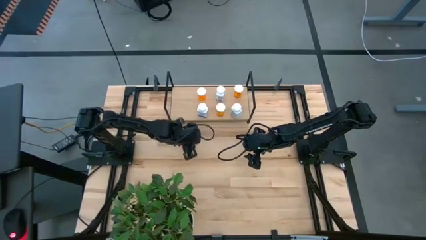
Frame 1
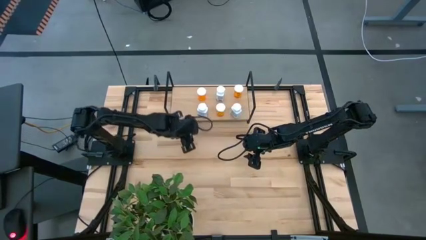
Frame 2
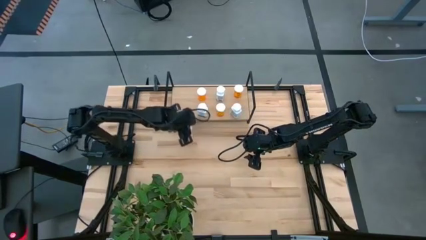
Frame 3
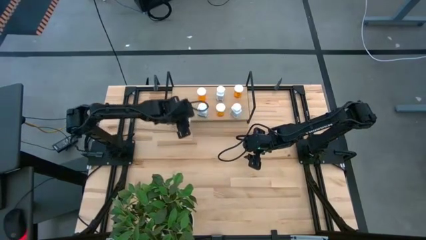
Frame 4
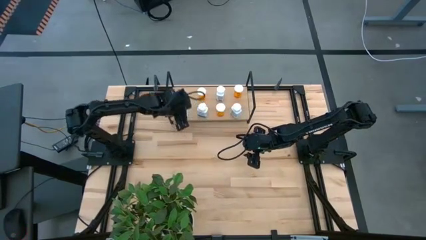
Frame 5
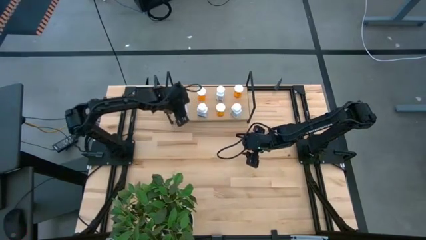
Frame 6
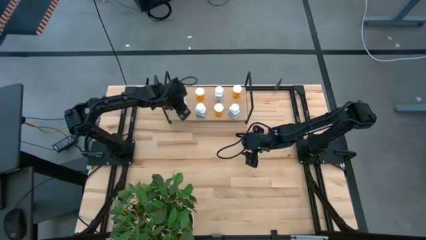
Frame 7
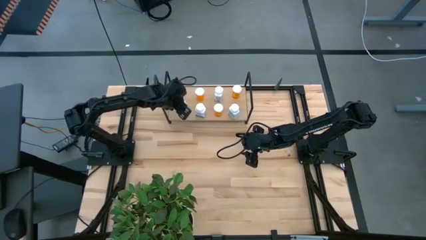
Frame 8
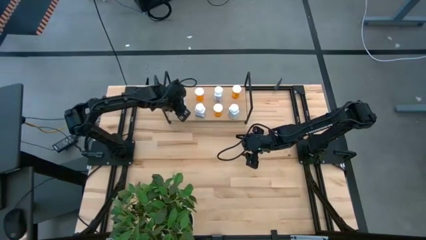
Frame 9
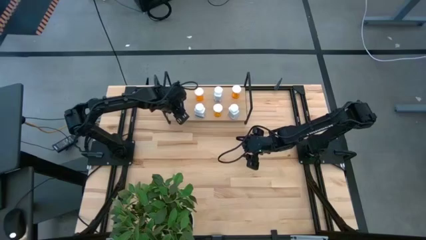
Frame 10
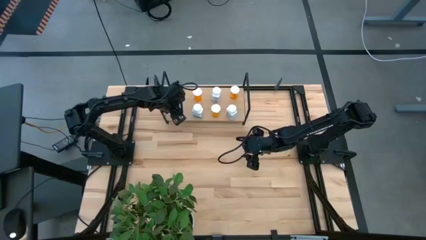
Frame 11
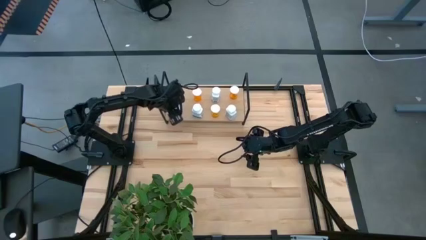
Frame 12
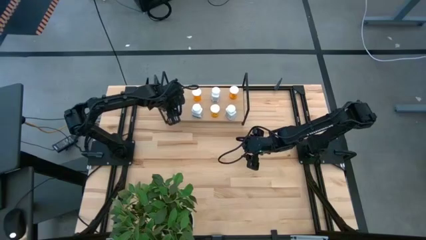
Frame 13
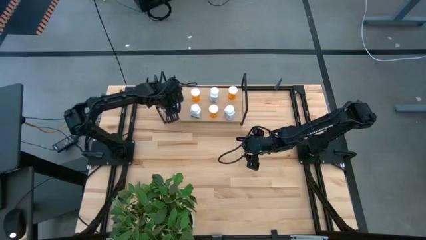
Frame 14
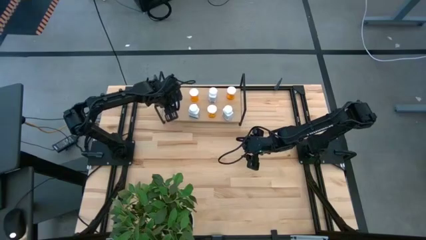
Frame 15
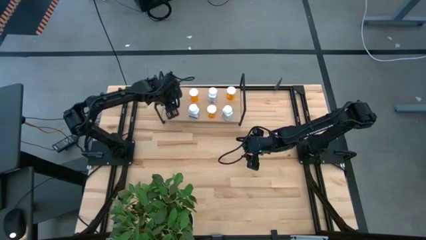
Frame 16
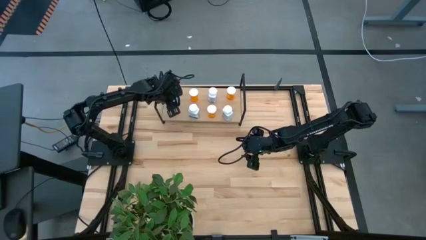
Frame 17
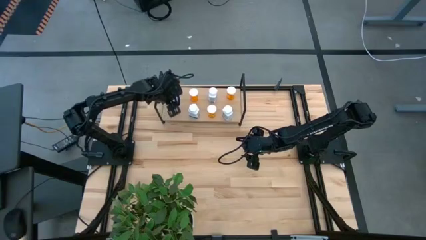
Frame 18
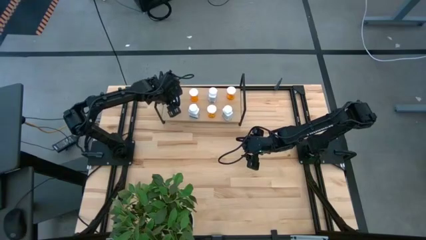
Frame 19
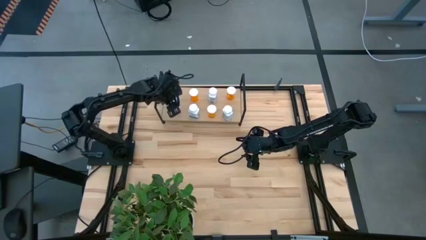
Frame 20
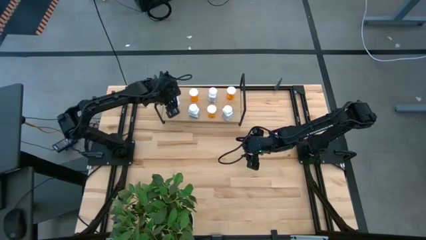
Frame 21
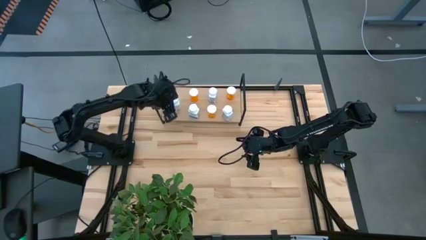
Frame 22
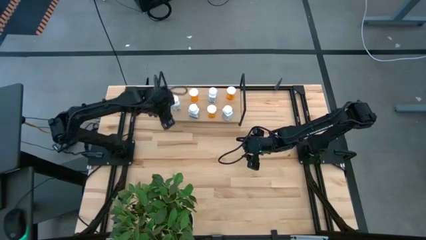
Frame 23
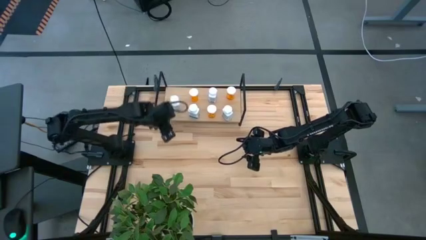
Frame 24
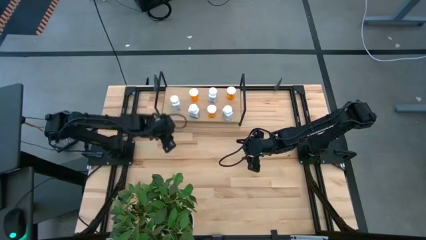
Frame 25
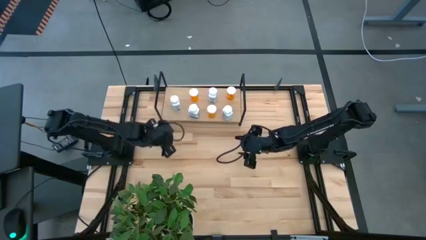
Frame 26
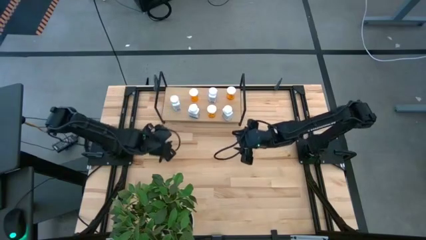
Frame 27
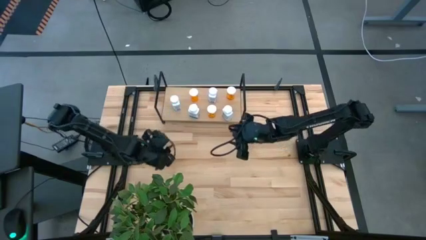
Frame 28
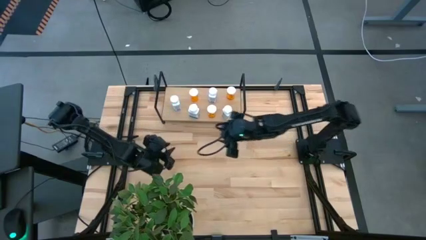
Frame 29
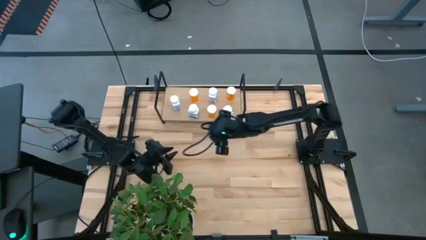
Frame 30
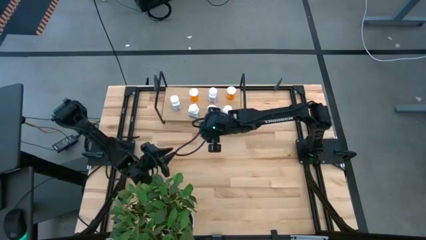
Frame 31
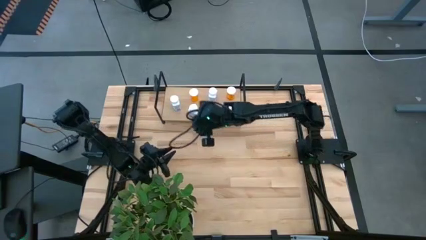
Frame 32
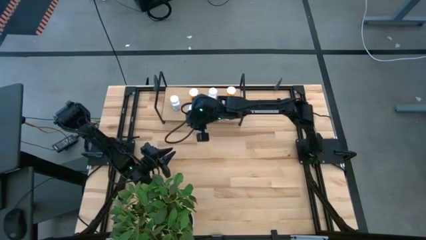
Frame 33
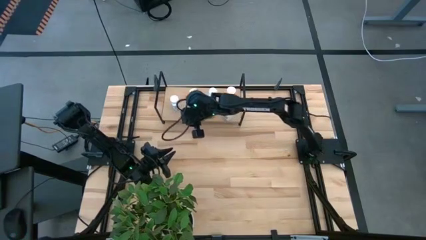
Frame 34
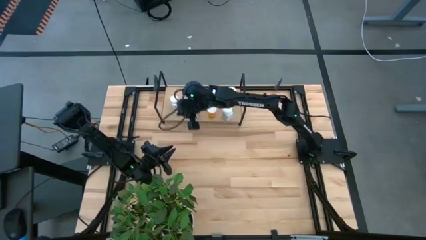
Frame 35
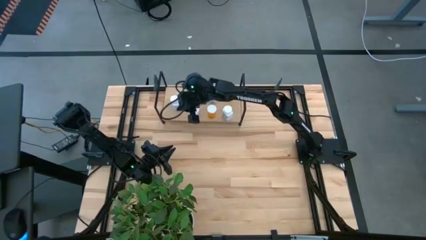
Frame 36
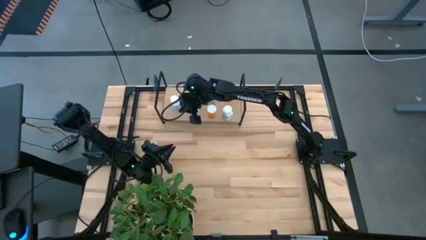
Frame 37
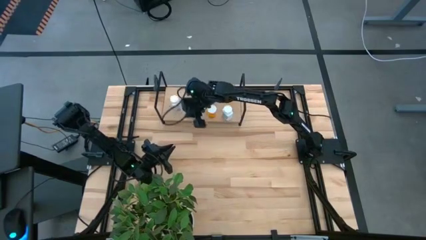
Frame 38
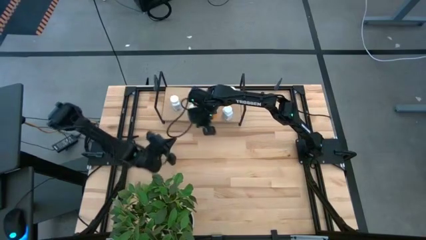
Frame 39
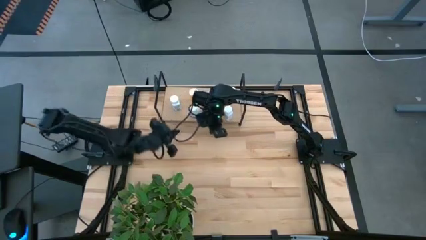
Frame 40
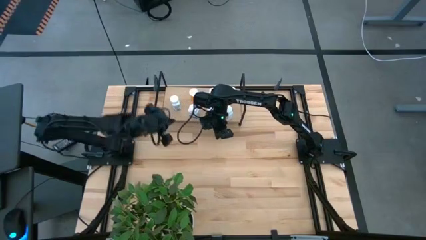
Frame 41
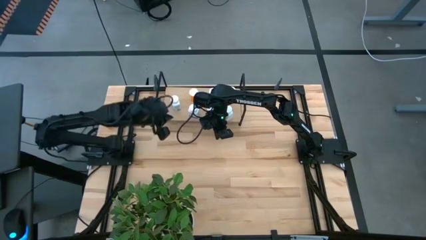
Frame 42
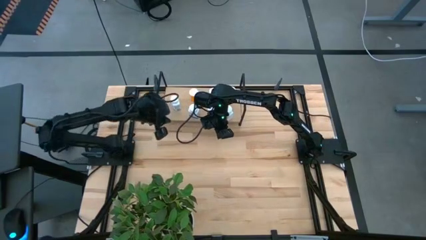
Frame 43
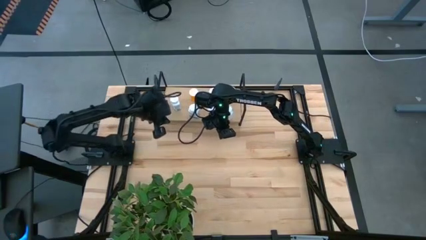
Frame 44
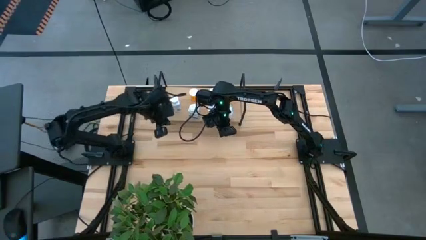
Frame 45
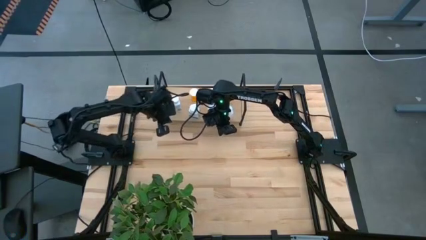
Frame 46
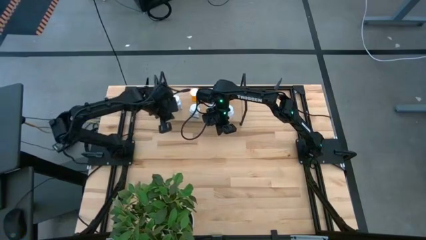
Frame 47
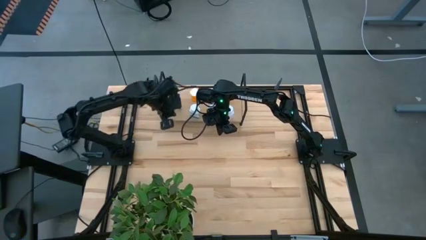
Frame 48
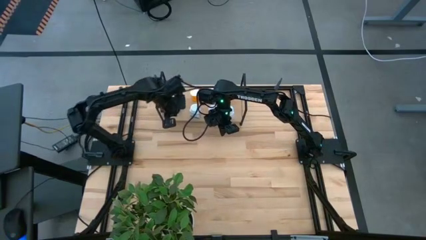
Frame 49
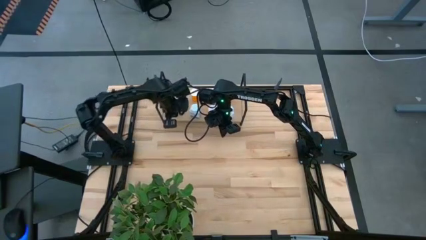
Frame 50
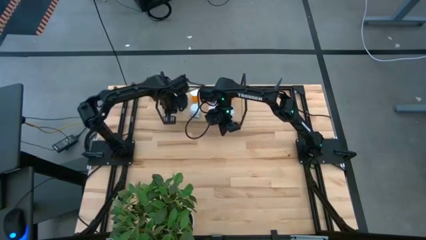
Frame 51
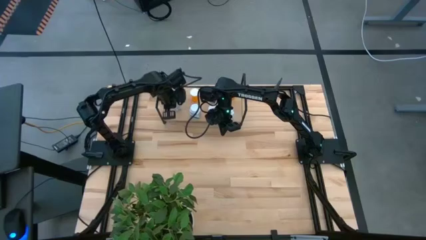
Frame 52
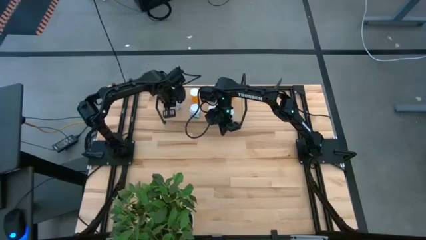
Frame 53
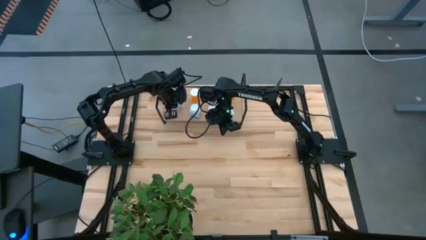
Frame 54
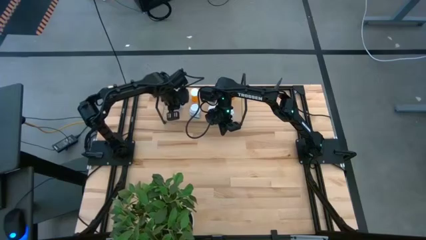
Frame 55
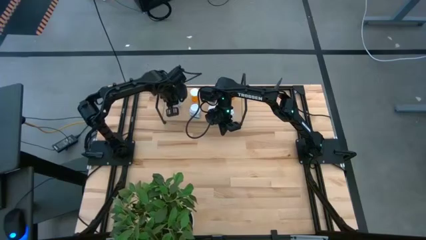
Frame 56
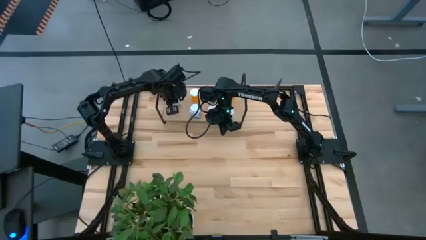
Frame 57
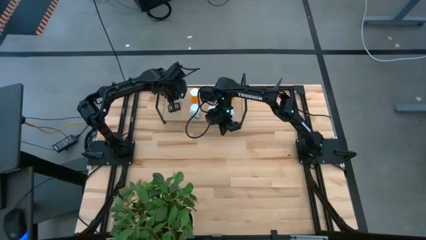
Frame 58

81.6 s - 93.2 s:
Task: Pick and place medicine bottles onto shelf by color
Put the white pill bottle on the shelf

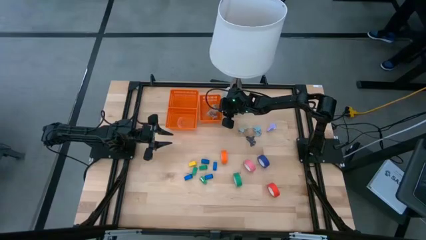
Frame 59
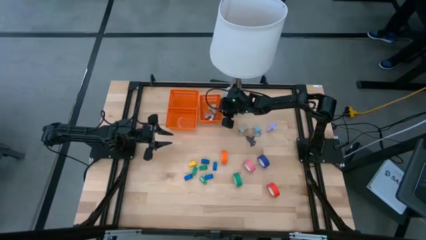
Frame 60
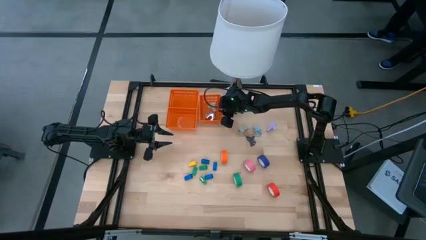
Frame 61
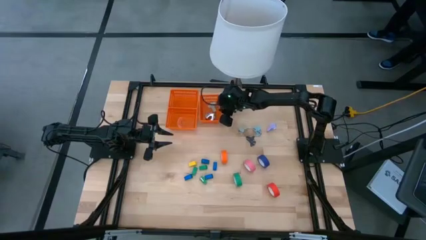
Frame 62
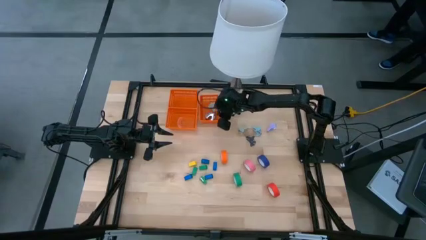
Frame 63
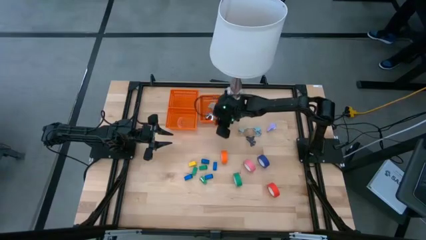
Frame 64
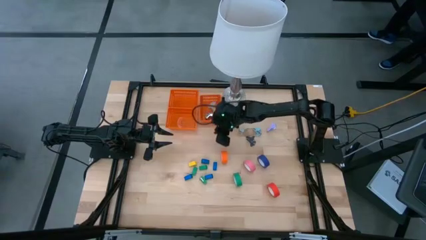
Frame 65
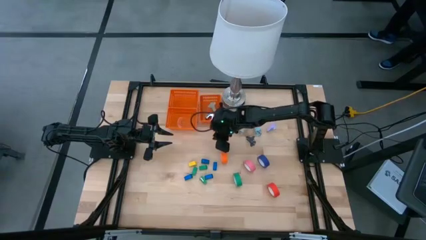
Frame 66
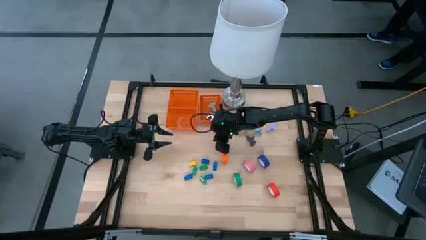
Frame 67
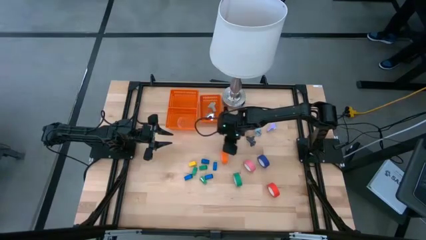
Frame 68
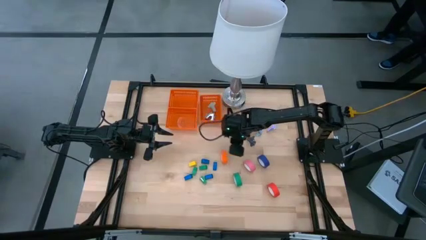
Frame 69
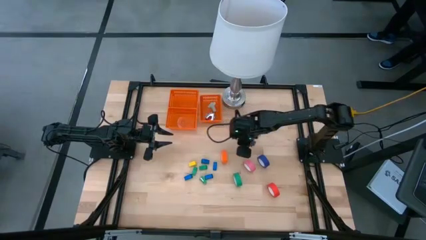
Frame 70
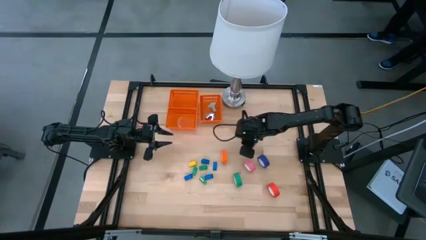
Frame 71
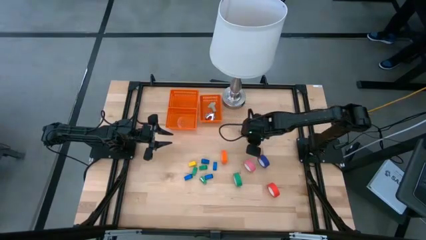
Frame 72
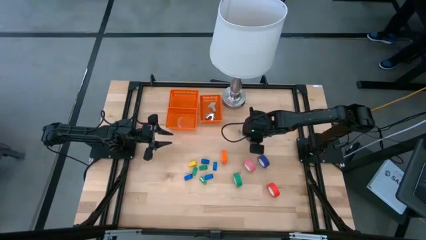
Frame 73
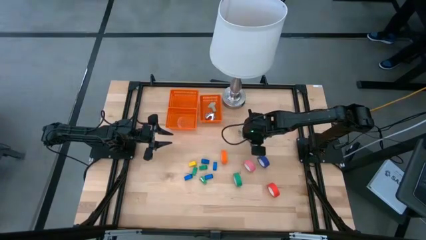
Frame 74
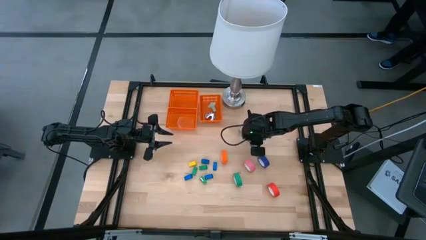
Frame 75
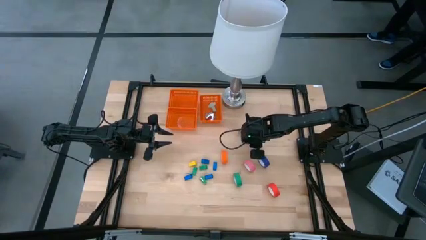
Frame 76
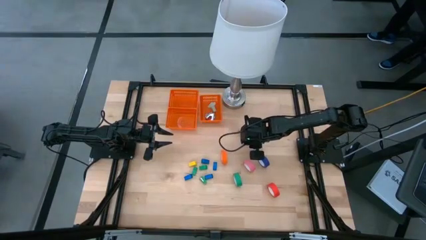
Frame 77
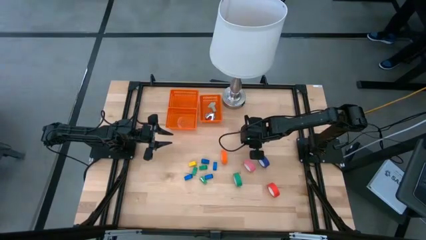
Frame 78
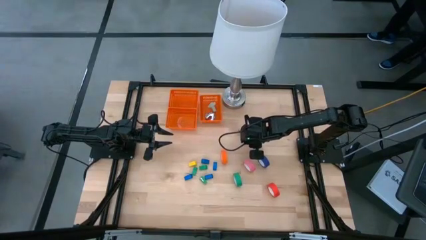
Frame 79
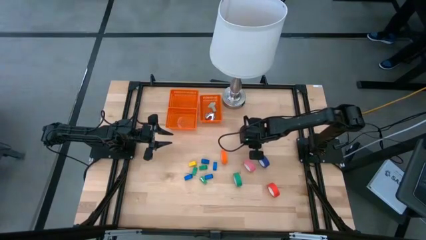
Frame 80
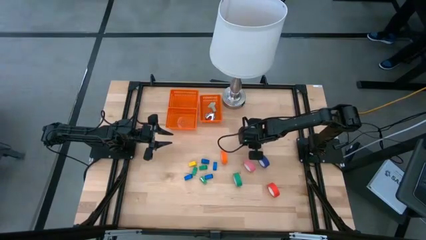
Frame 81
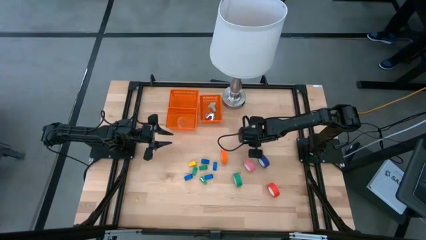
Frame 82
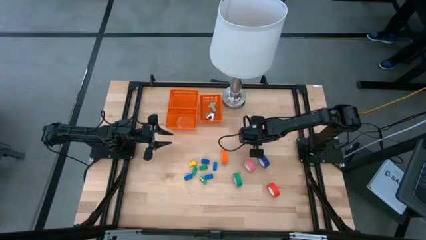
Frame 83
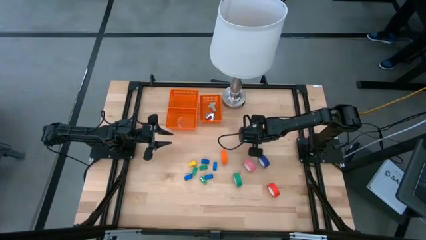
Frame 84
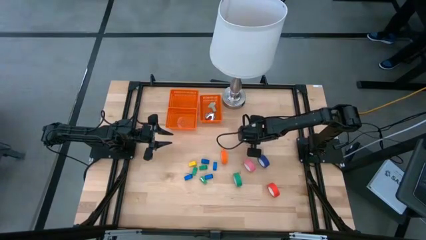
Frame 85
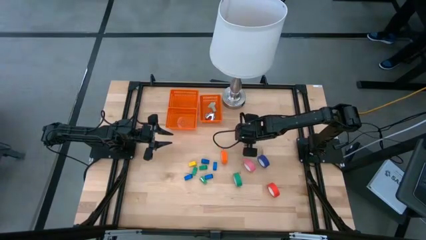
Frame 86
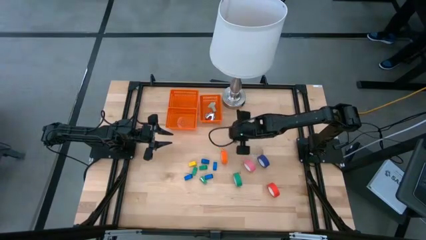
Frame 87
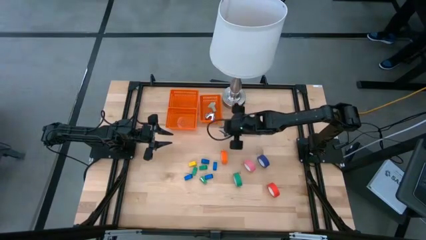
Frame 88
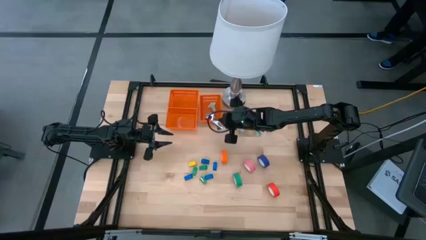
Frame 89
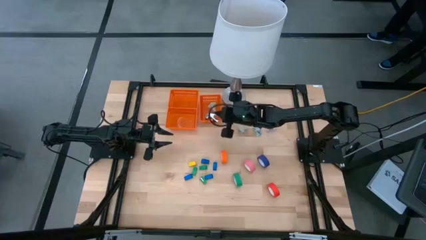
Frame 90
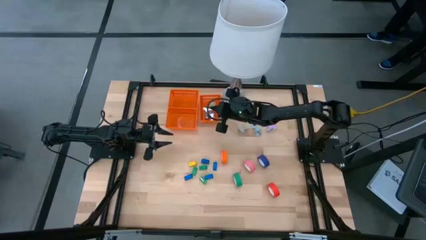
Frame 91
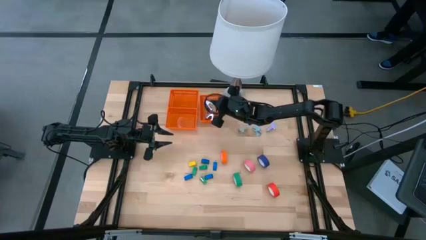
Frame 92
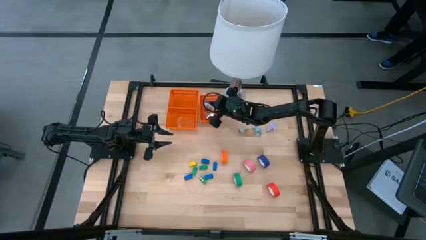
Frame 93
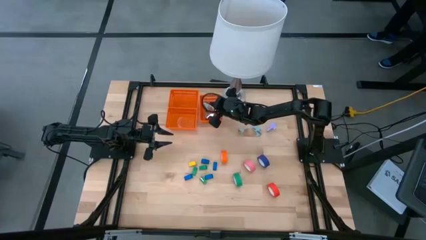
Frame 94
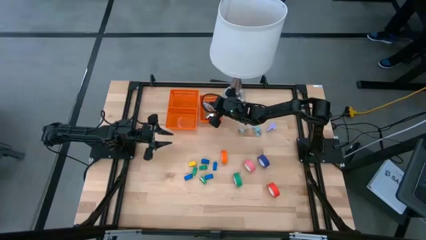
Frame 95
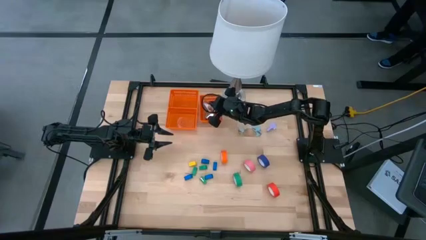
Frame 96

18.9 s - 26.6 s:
Task: Pick and place Stapler, Stapler remover, tape
Put the black staple remover into the right orange basket
